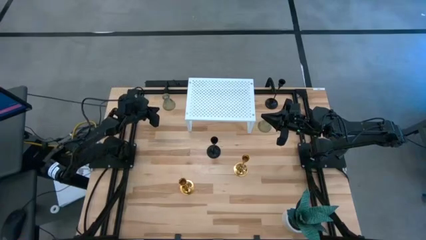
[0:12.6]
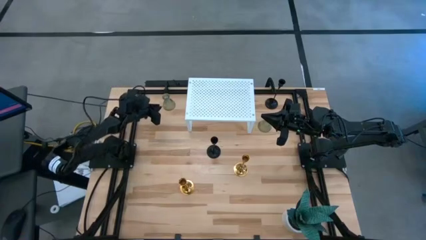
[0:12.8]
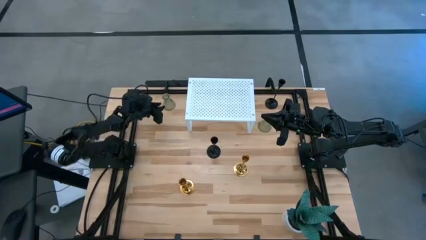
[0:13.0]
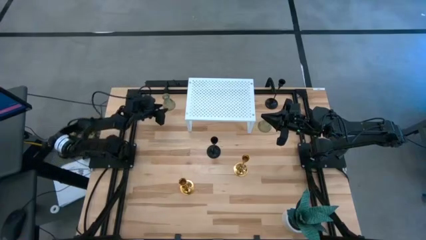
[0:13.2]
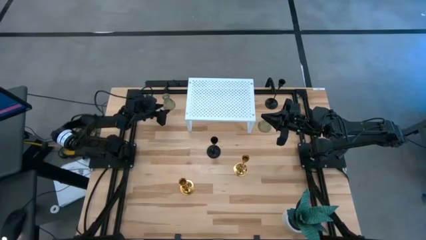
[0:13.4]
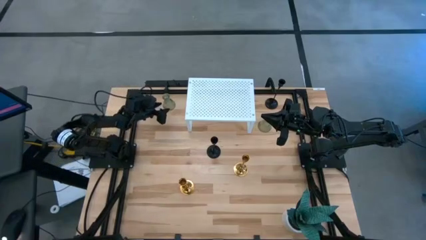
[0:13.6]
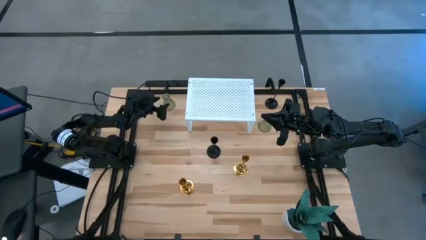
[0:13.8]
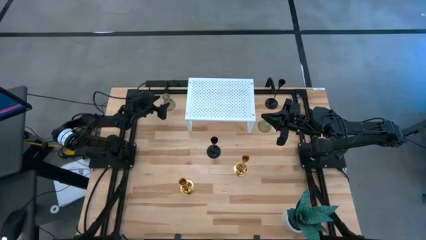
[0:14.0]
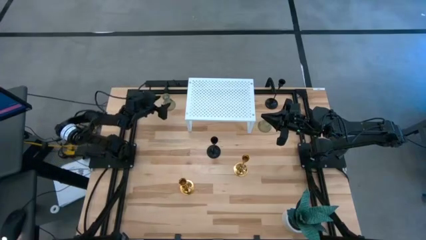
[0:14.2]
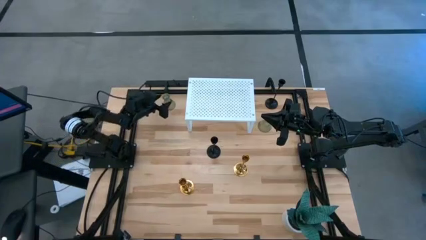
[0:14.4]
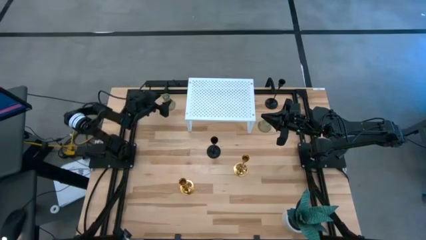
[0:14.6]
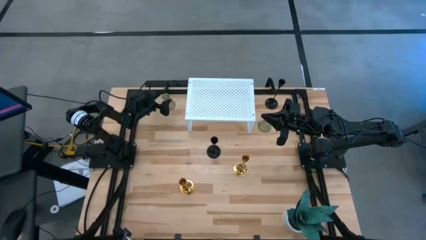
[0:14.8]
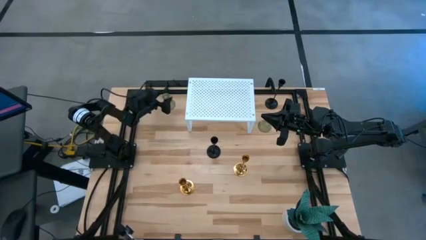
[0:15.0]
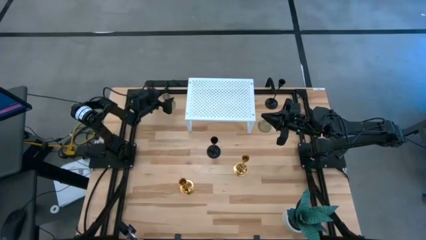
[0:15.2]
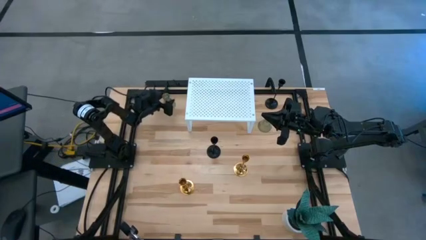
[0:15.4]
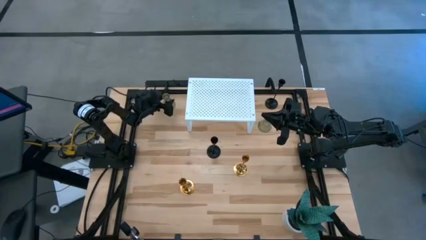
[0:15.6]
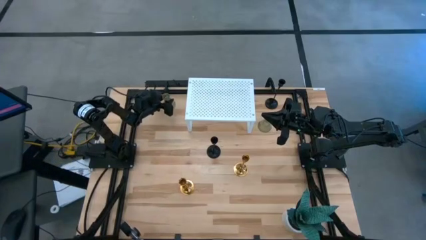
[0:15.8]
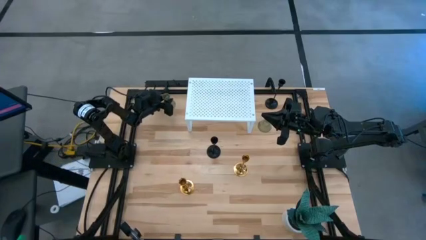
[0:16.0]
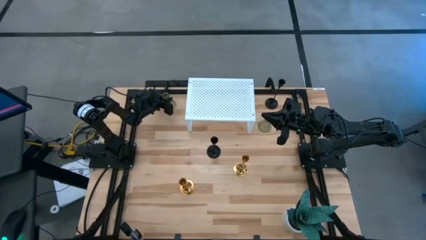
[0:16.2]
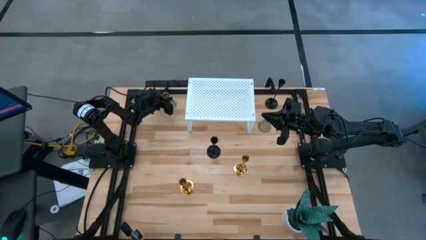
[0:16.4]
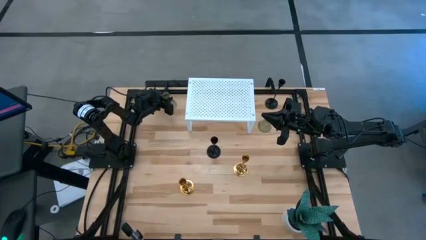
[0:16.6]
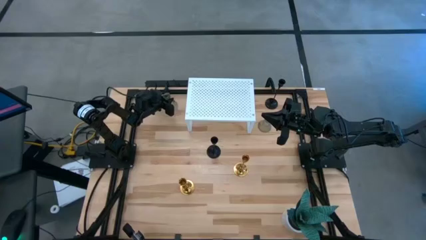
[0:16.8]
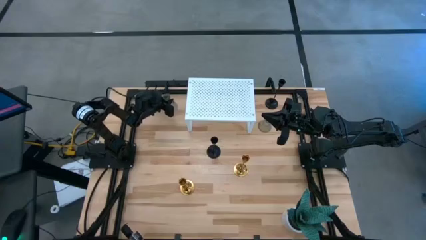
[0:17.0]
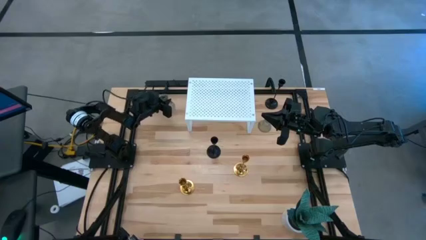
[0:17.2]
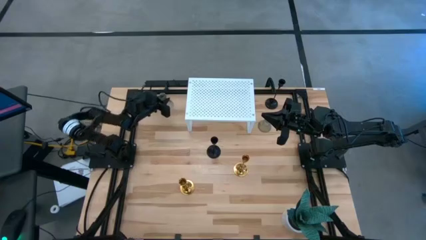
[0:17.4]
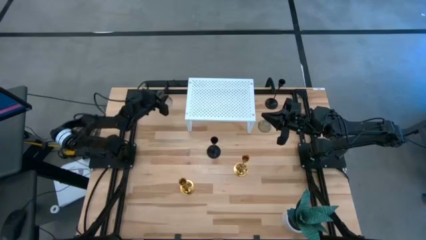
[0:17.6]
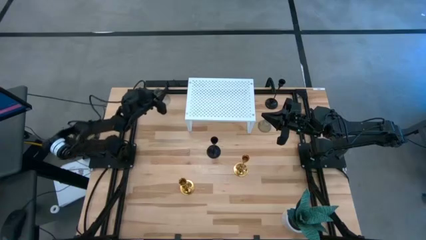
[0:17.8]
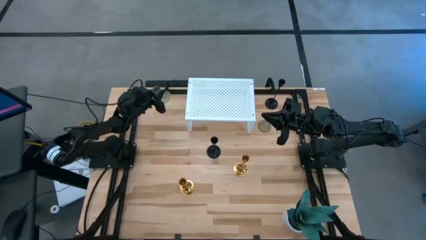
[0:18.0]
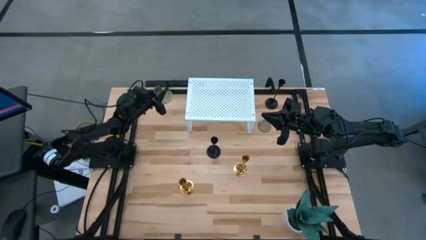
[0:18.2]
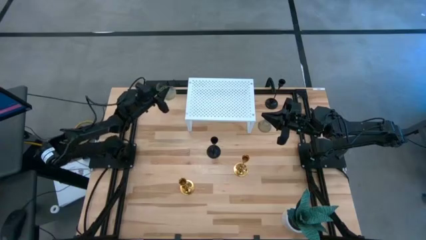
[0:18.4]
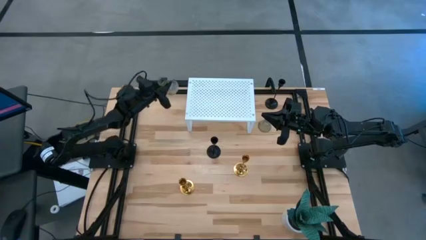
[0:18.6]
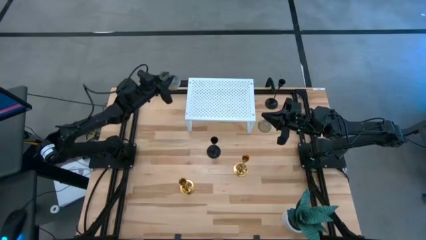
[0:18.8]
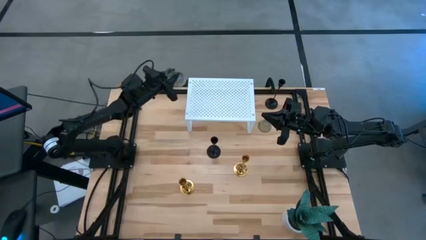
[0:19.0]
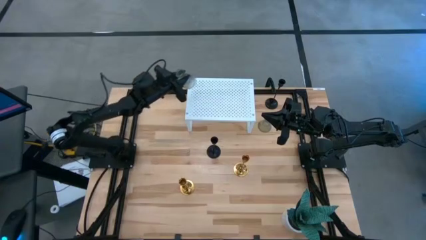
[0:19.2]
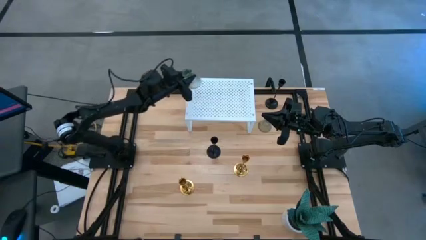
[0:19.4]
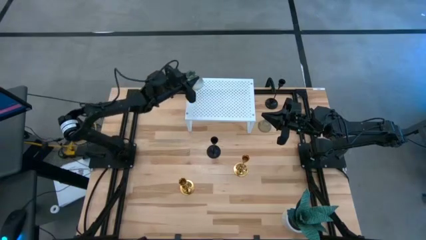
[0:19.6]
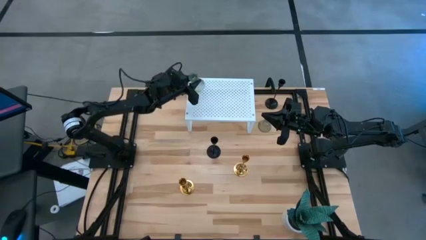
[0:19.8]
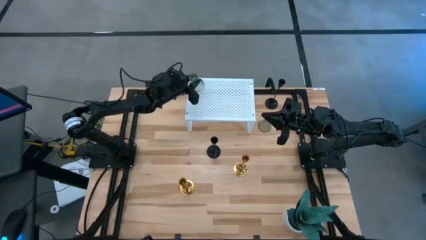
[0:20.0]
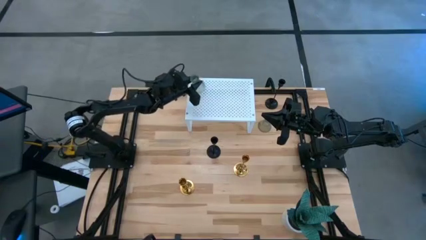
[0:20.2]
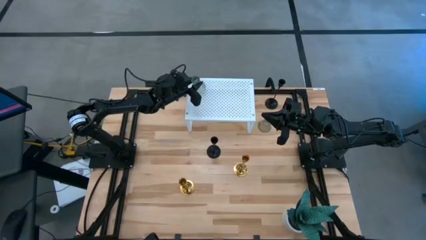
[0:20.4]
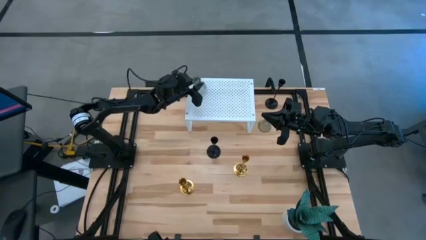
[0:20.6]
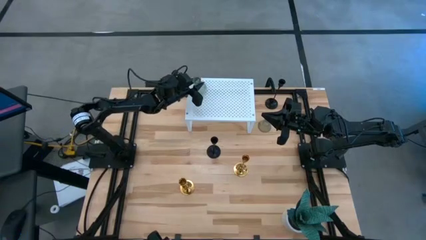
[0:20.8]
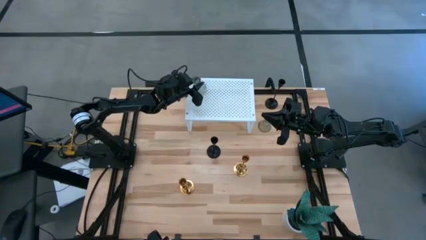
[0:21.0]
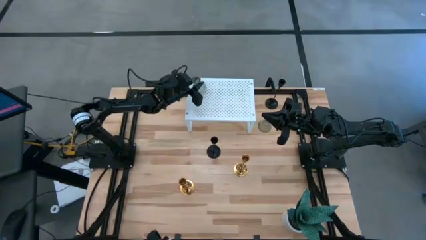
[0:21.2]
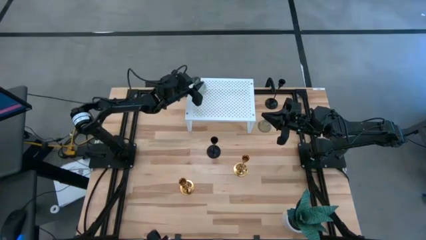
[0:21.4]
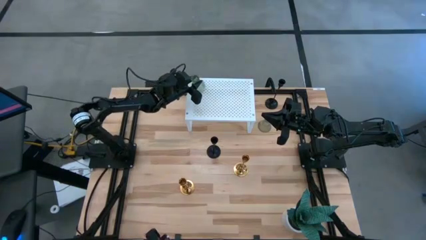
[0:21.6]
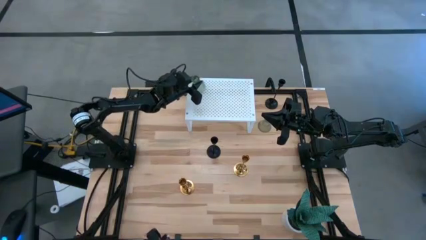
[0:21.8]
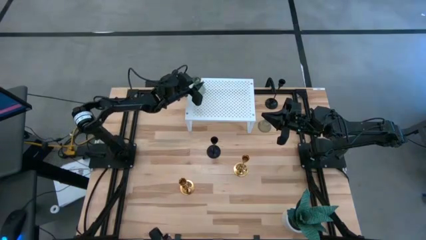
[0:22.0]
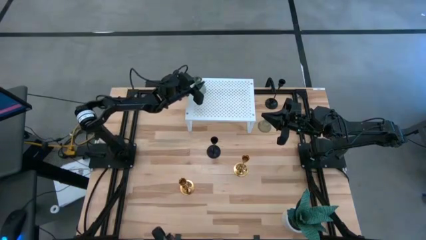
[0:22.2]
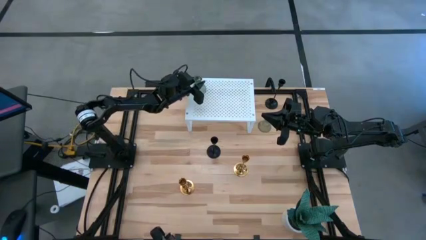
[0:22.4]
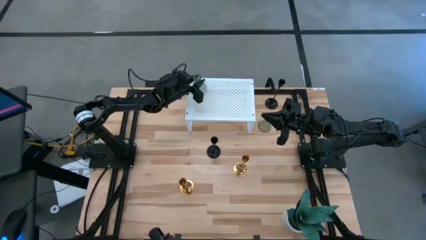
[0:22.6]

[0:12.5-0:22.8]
Task: Pick & Place candle stick holders
Put the top transparent candle holder on the shelf
